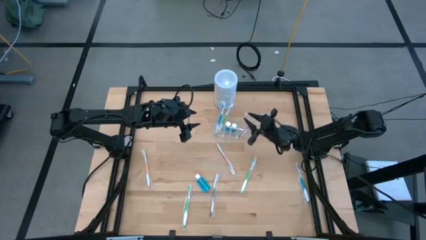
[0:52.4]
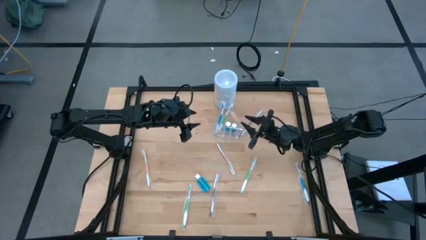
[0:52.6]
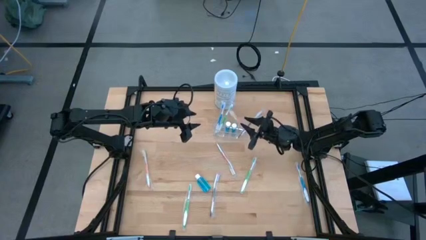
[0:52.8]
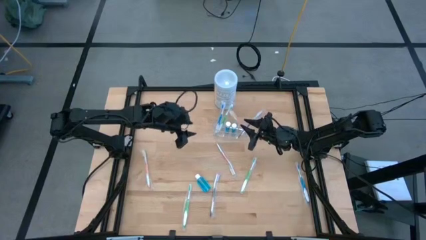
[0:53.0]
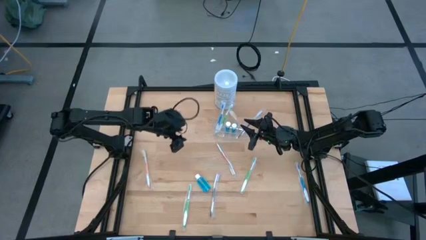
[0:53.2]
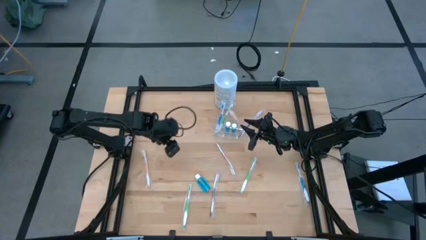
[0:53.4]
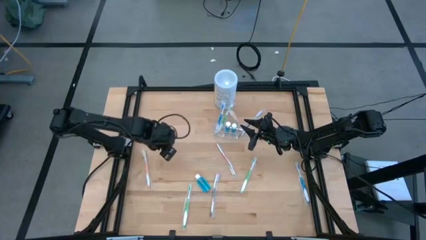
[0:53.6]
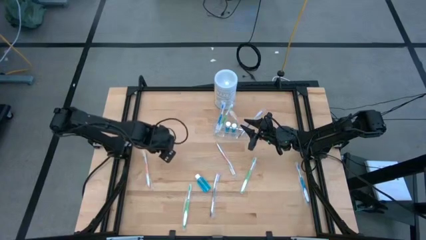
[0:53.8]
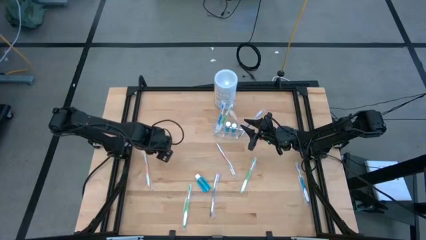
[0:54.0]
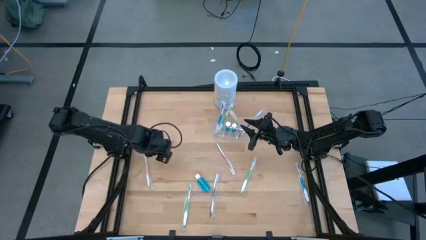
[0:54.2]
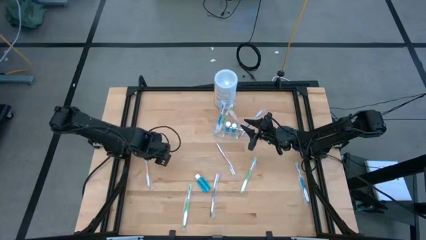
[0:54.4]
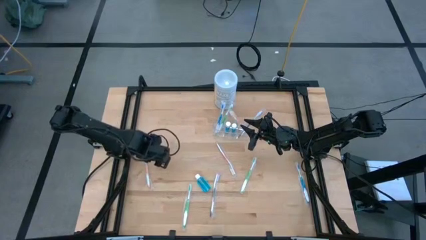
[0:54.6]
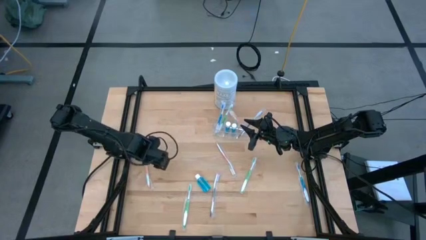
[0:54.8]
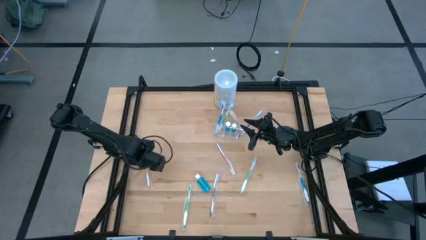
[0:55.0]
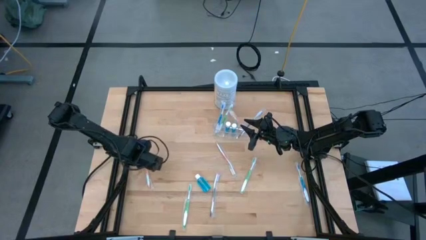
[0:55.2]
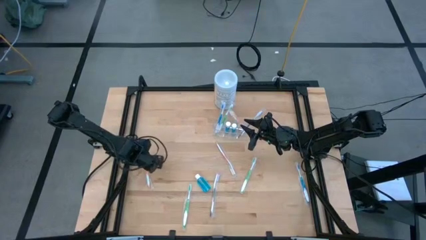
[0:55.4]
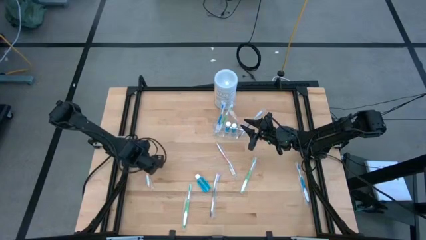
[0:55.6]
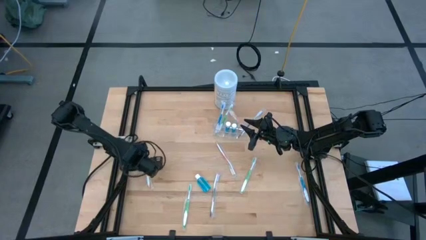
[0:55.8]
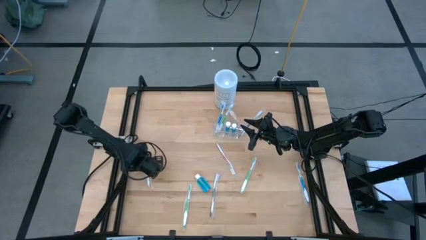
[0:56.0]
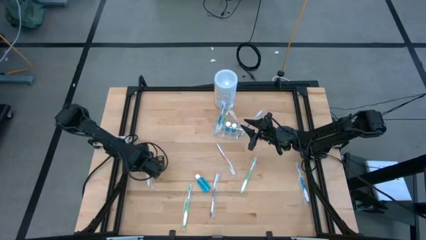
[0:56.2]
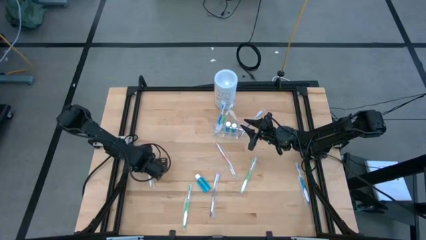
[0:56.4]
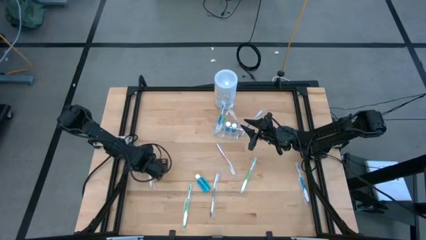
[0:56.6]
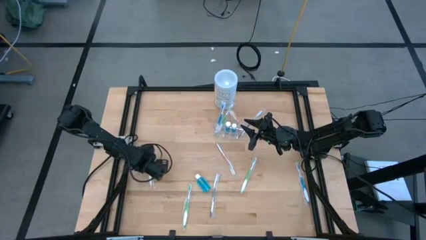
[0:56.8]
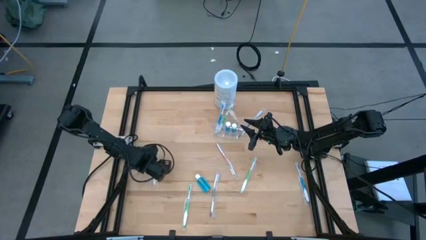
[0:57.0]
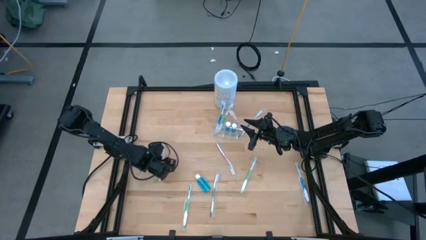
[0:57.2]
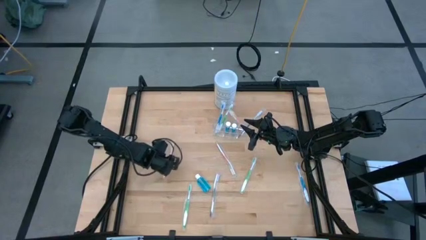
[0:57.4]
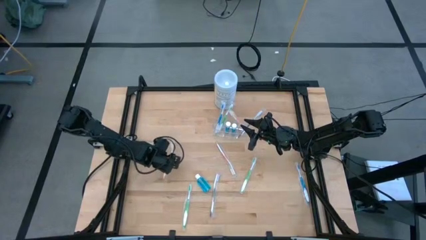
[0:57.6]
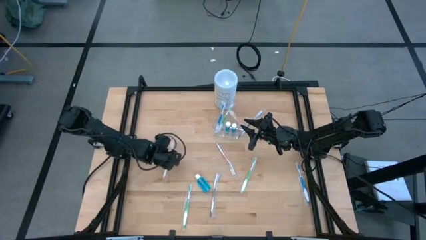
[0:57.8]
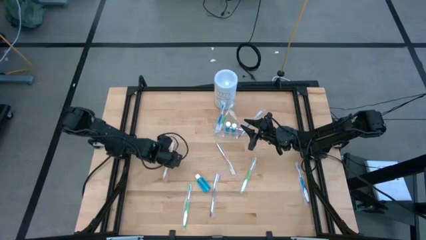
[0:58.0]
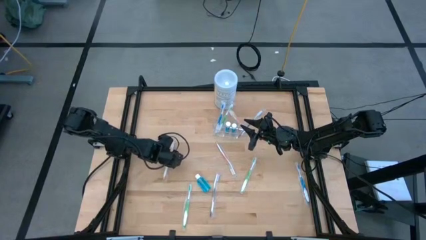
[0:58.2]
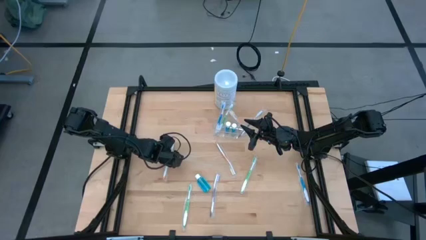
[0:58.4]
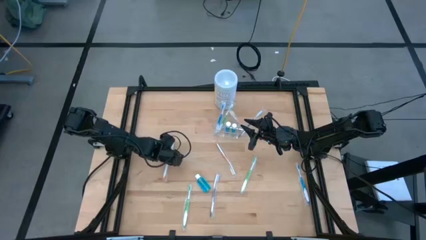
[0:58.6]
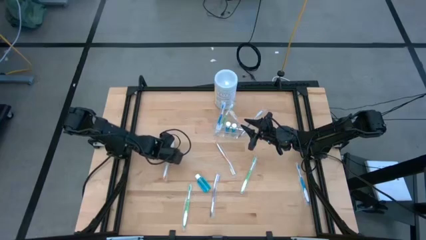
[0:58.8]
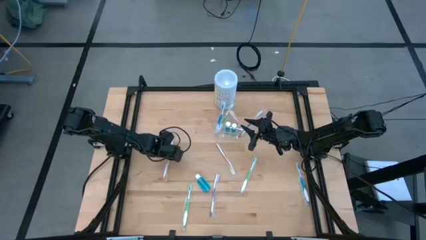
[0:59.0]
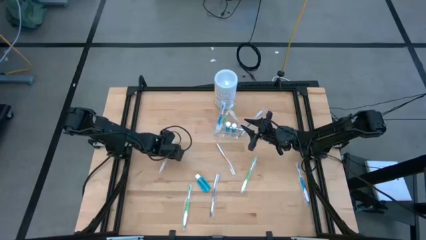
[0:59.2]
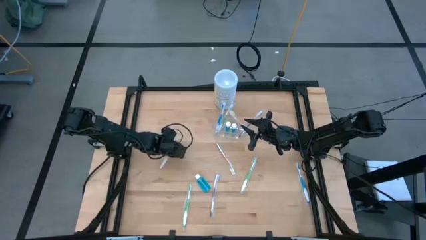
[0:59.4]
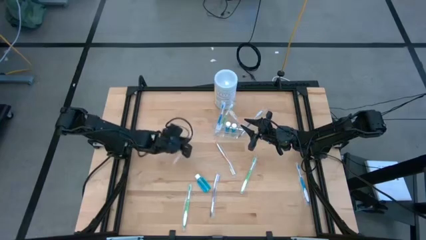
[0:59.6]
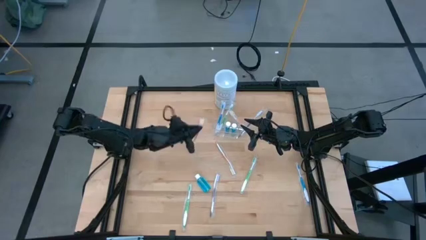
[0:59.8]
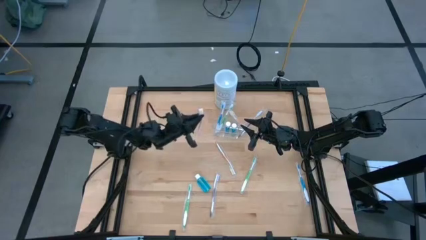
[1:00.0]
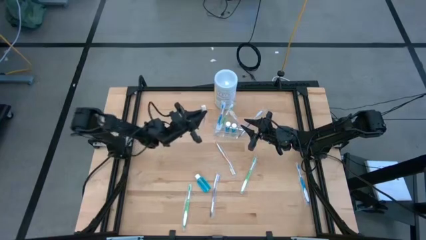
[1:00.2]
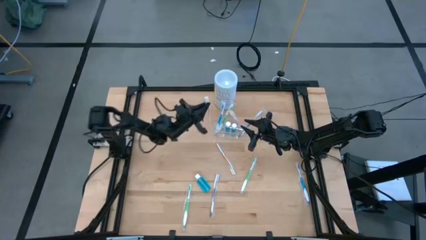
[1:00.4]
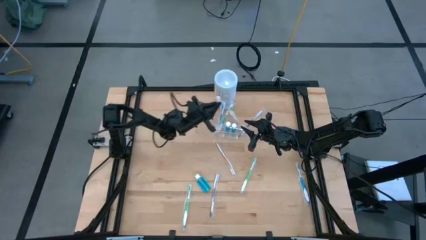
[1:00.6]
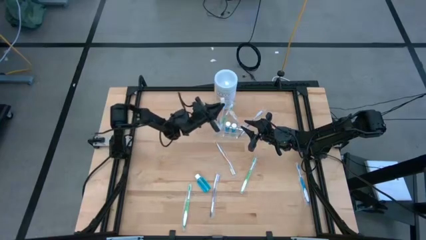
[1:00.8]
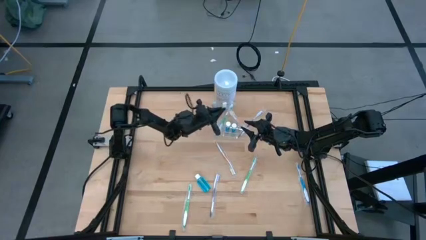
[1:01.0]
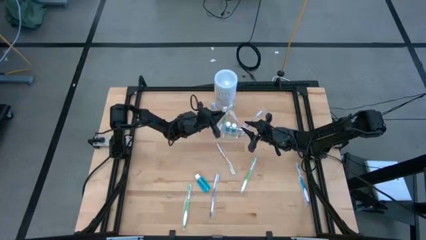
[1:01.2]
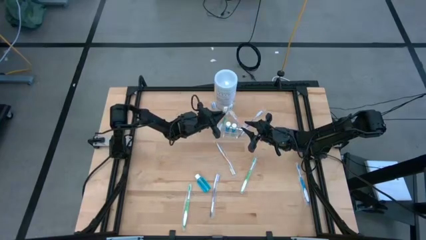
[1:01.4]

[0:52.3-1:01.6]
Task: Pick & Place toothbrushing station
Put the left orange toothbrush into the transparent organizer

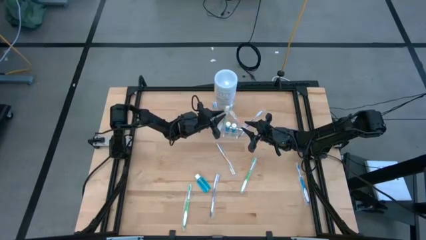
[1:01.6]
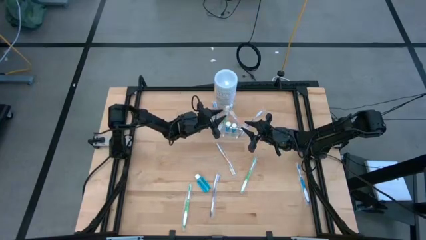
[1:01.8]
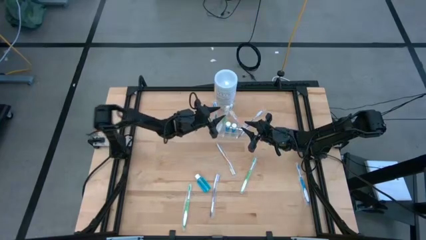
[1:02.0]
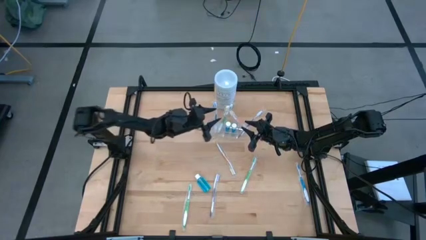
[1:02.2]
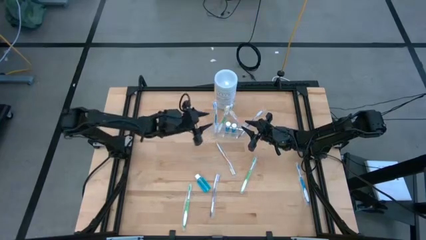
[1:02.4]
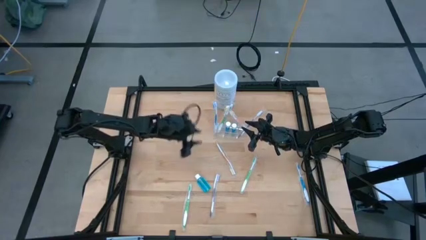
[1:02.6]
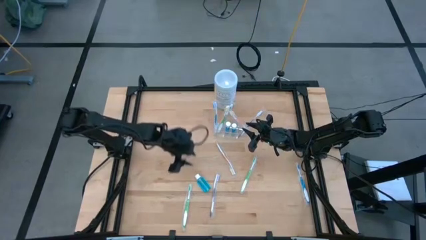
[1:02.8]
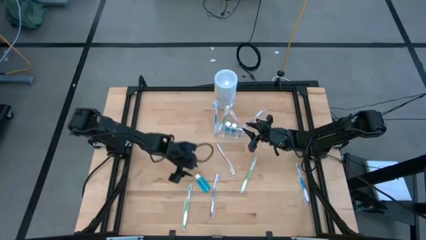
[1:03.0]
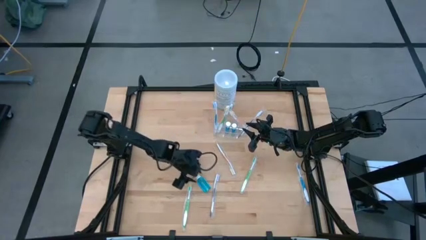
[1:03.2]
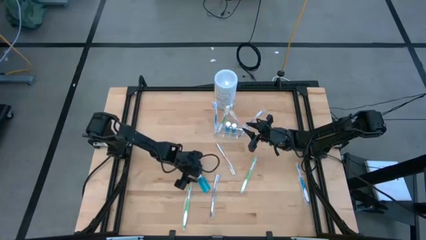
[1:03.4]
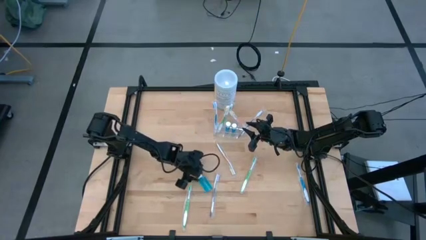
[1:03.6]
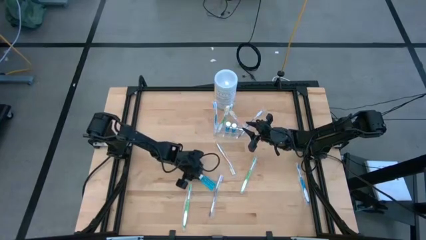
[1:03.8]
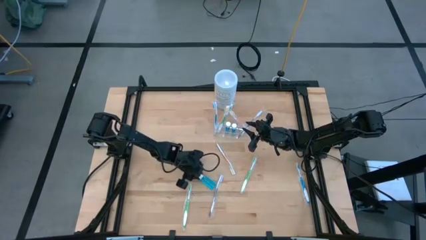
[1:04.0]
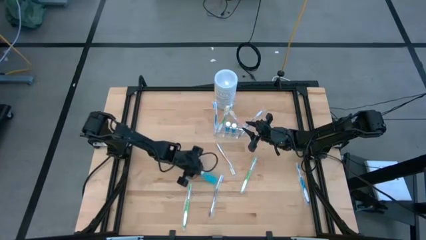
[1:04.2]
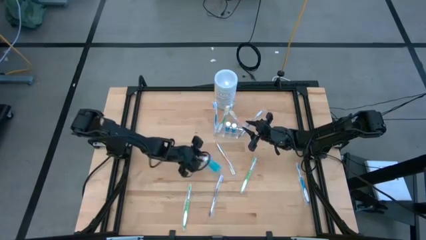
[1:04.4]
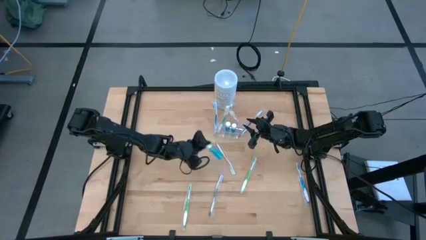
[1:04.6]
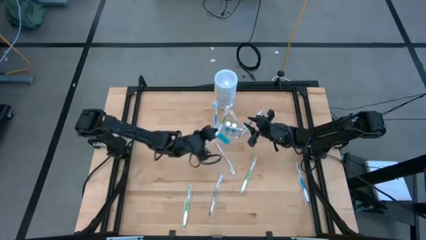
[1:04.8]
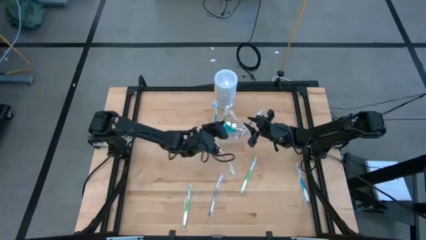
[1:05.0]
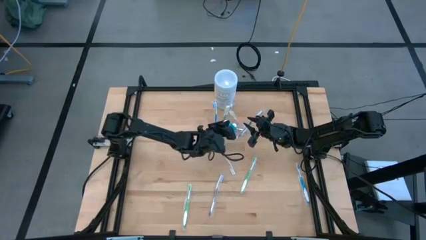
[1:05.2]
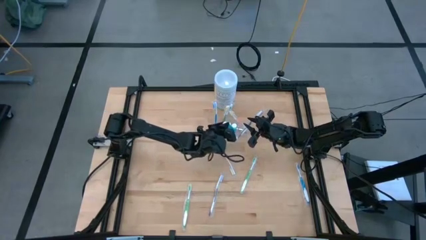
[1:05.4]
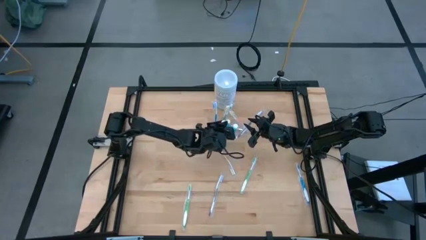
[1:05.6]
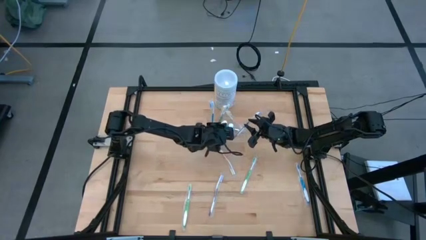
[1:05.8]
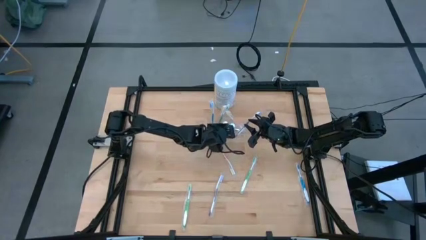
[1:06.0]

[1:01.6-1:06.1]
Put the mouthwash into the transparent organizer

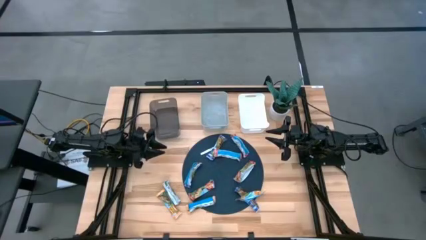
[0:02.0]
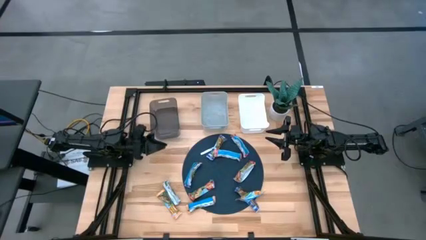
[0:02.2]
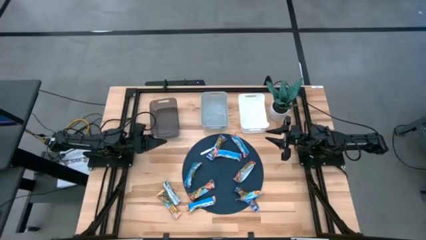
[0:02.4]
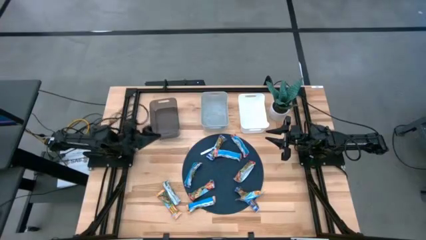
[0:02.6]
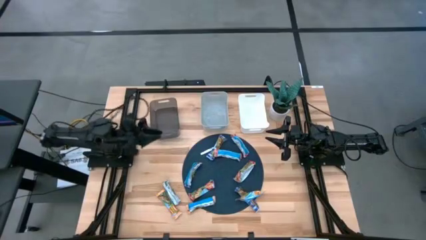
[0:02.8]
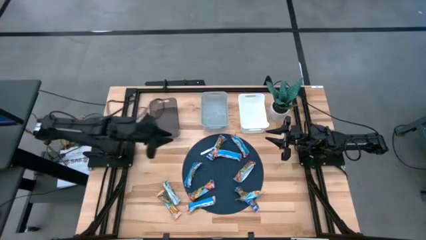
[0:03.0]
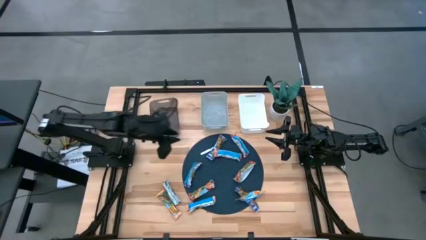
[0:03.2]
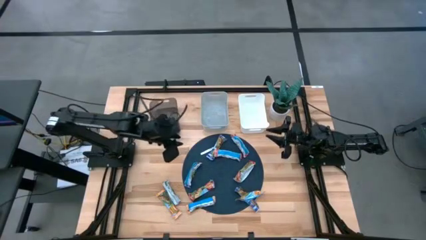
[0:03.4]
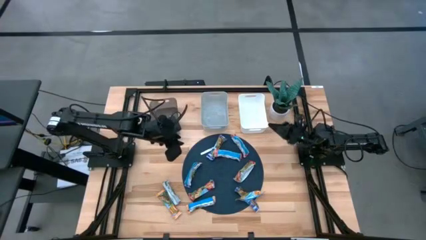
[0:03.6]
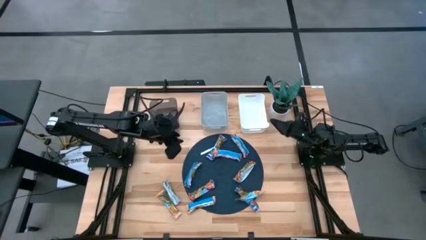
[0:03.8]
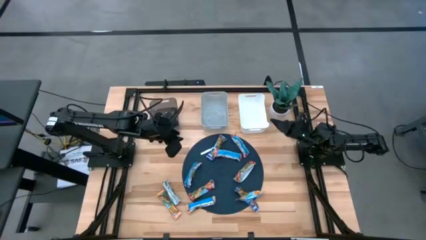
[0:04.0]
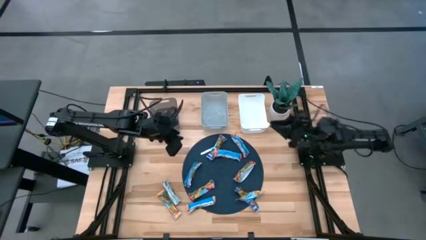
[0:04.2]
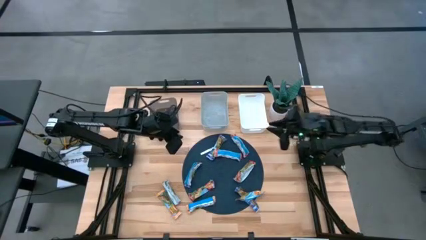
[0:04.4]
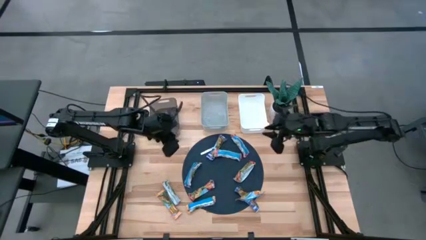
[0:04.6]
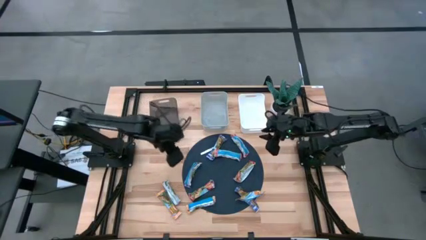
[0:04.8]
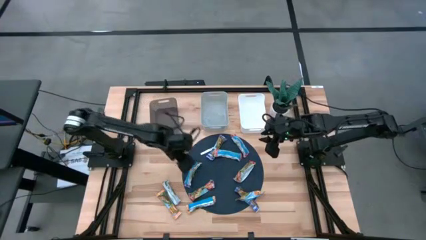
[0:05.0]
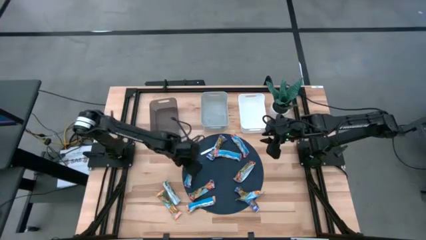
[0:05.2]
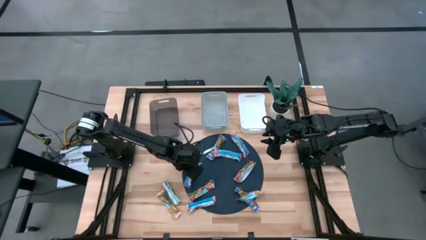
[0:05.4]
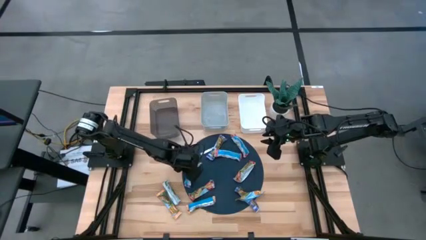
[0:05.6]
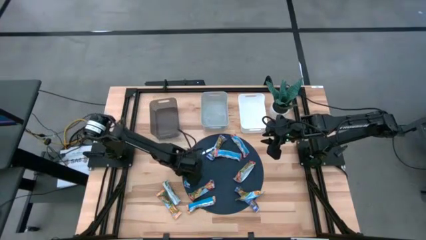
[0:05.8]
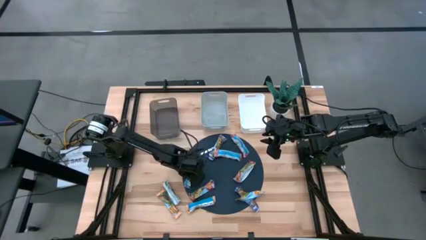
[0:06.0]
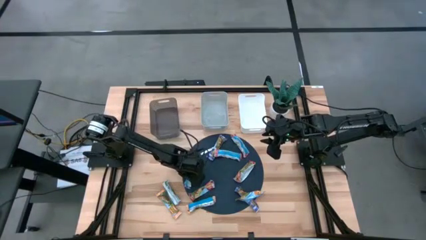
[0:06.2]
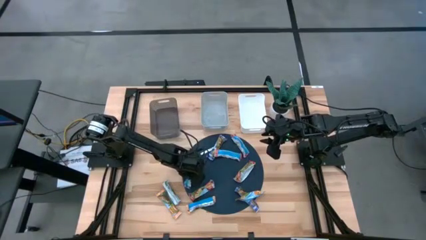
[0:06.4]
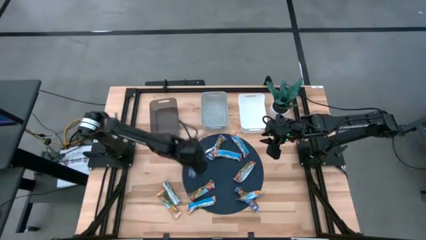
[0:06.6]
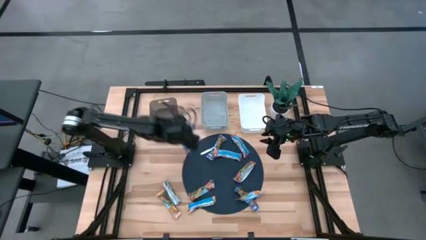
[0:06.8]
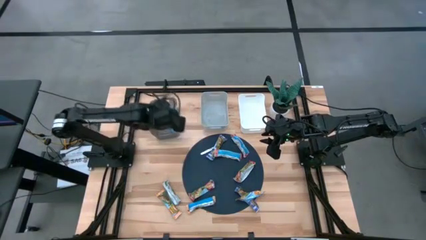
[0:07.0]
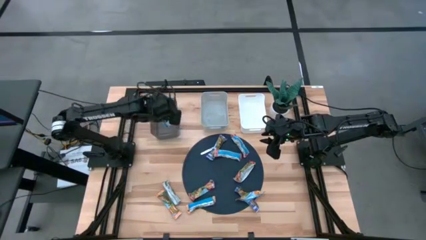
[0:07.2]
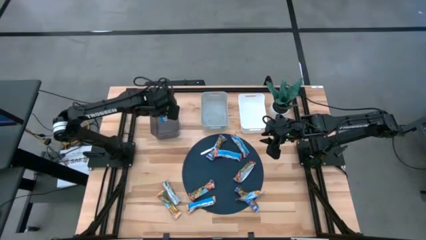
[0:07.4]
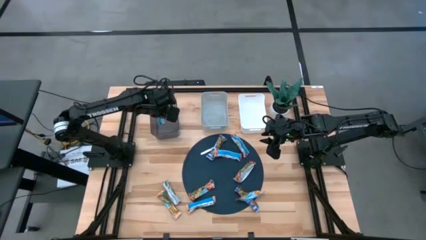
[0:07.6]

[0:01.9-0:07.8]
Task: Pick and place Granola Bars by type
Put the blue granola bar into the black bin
